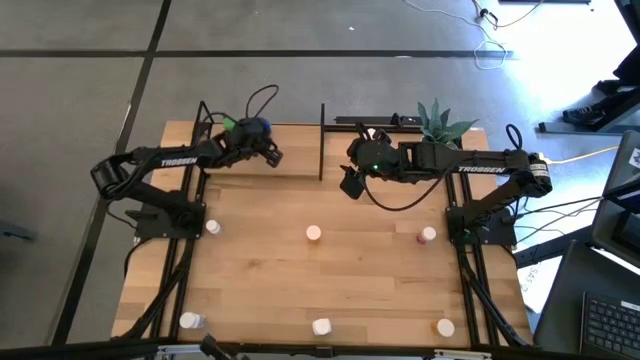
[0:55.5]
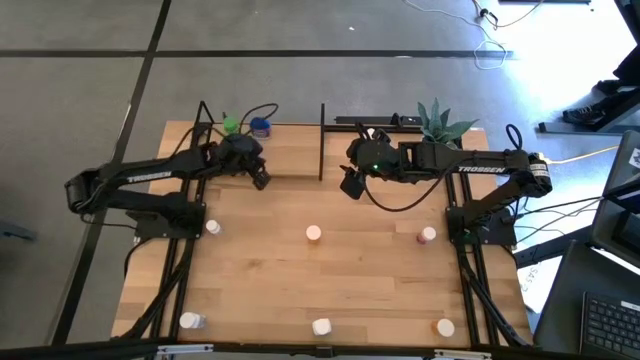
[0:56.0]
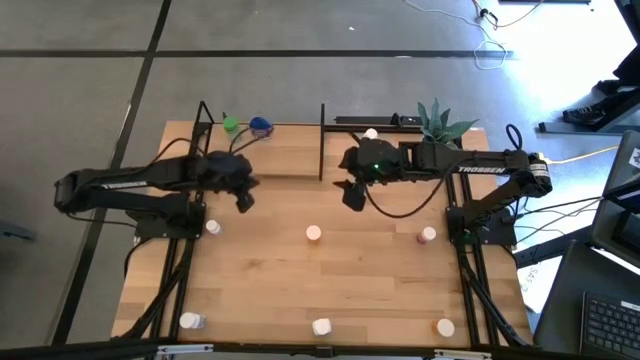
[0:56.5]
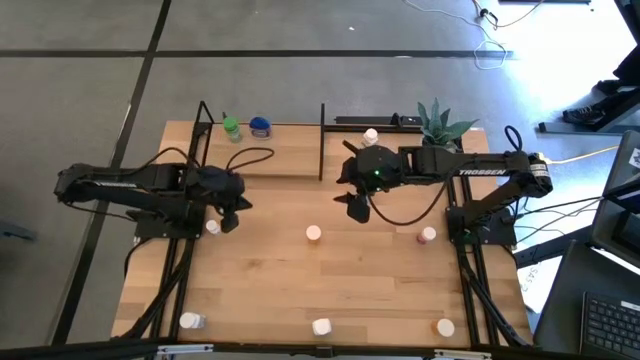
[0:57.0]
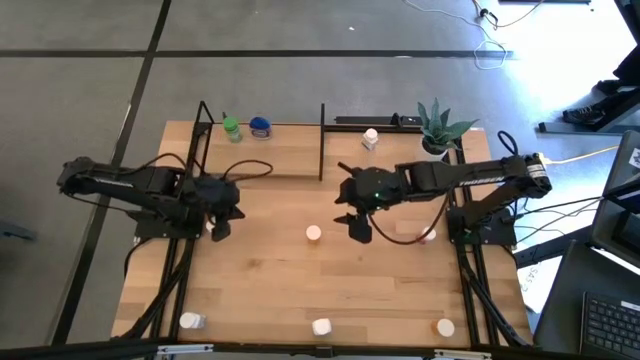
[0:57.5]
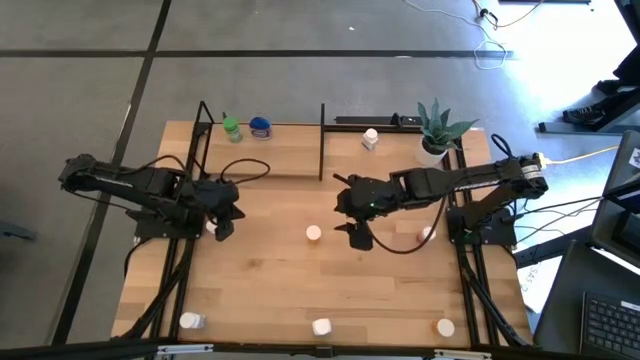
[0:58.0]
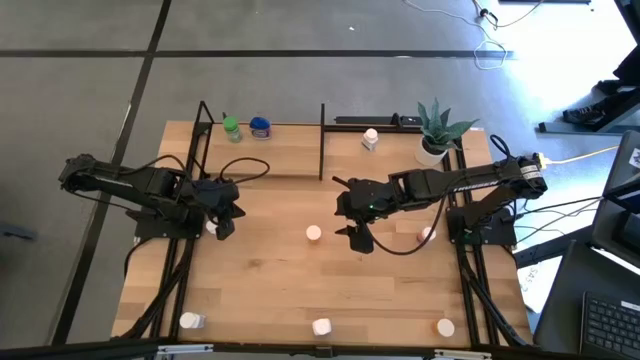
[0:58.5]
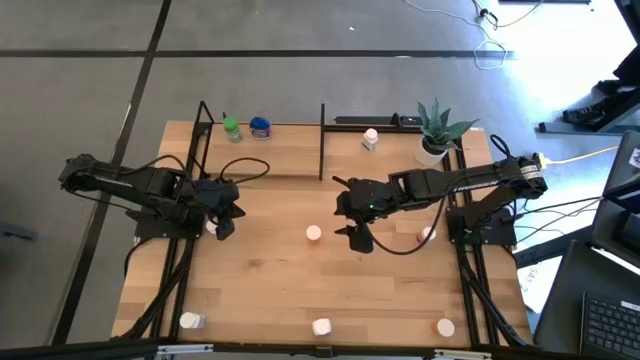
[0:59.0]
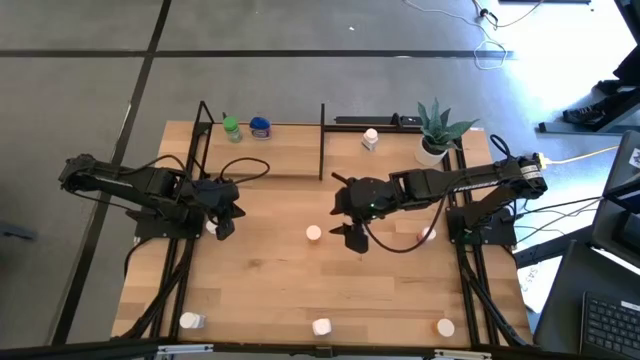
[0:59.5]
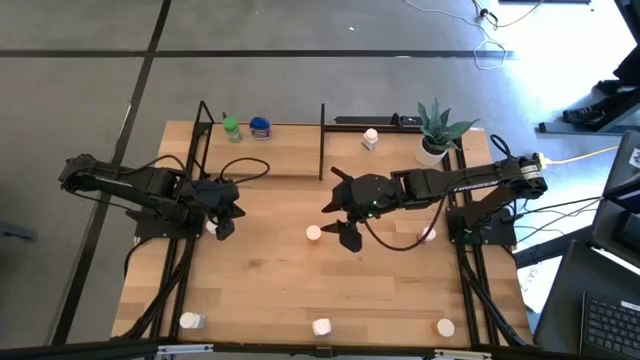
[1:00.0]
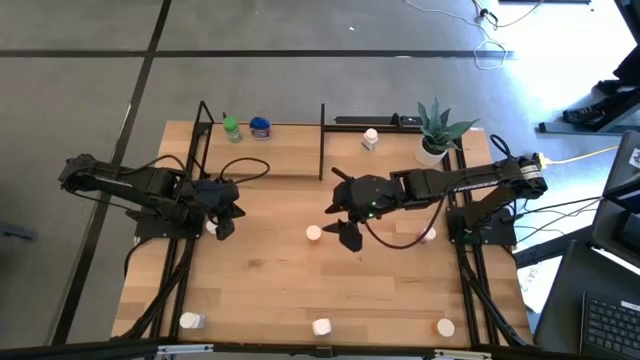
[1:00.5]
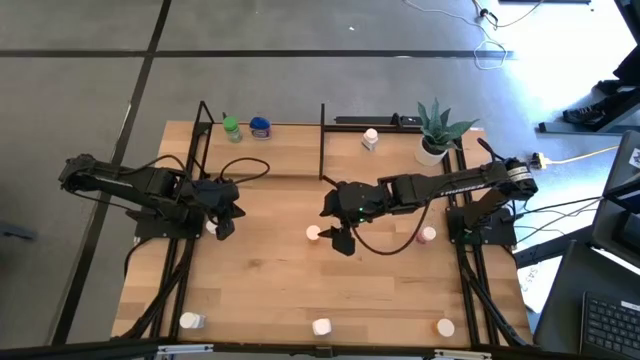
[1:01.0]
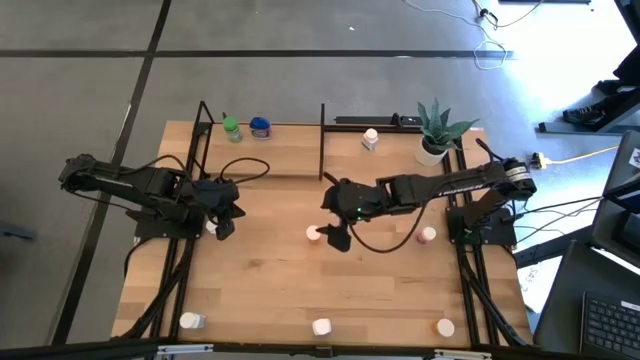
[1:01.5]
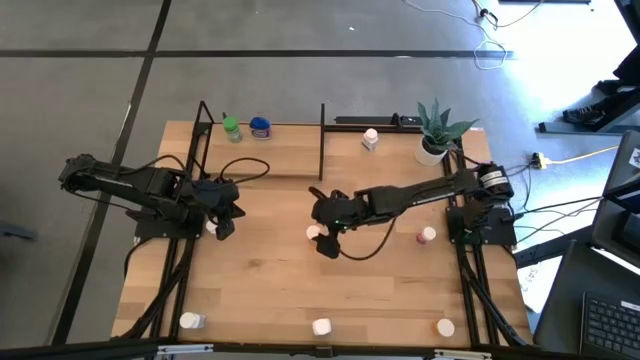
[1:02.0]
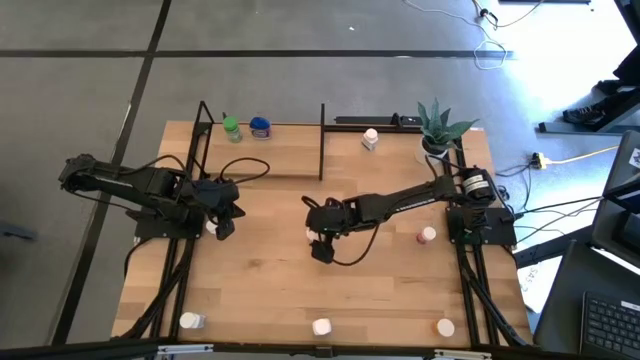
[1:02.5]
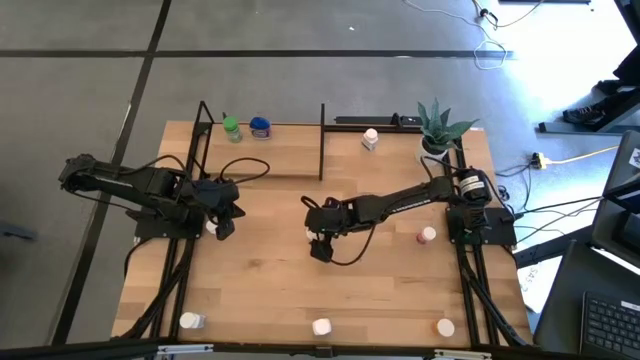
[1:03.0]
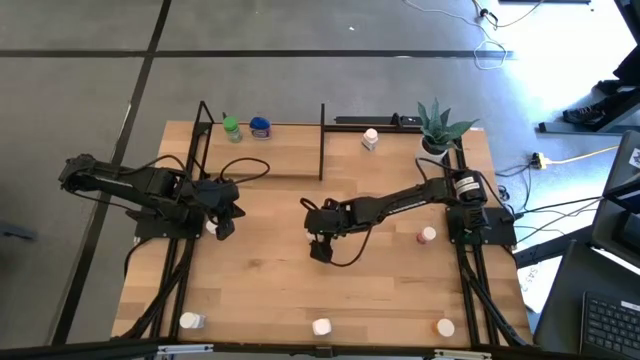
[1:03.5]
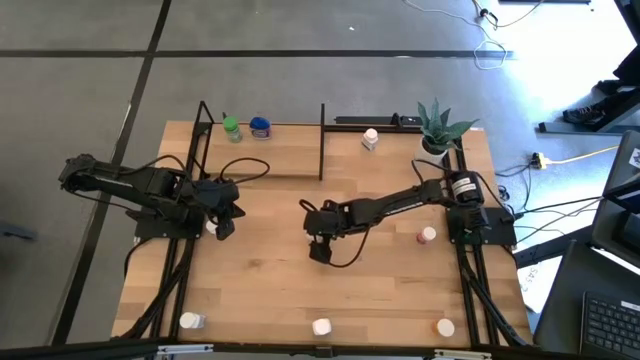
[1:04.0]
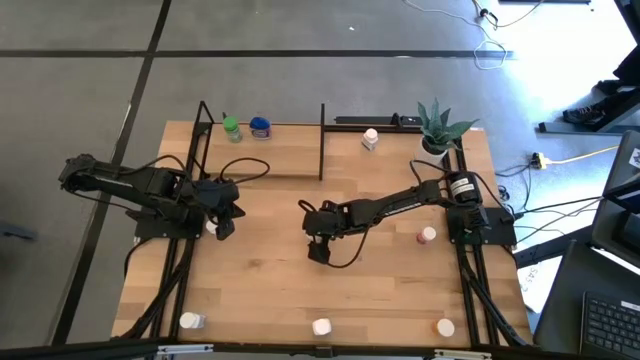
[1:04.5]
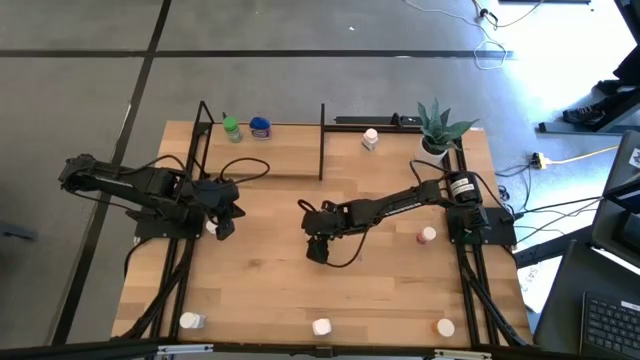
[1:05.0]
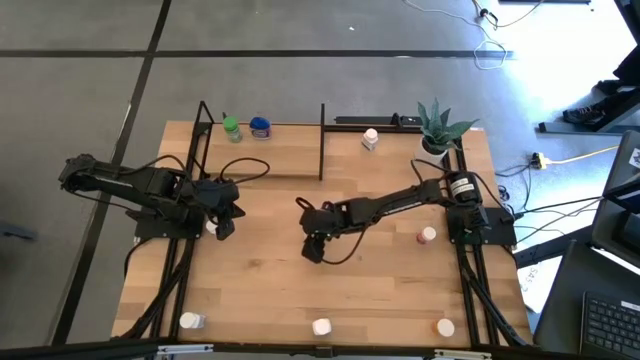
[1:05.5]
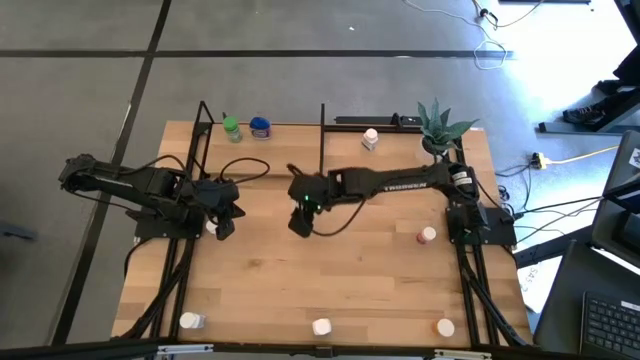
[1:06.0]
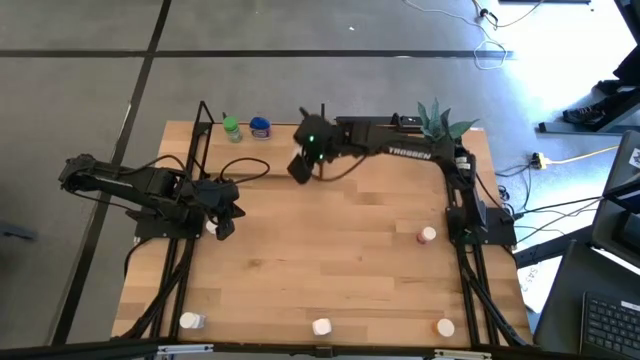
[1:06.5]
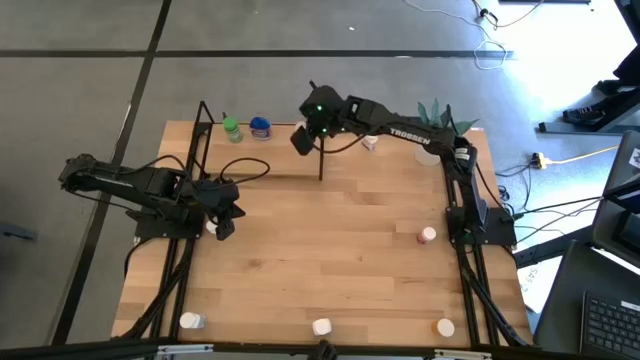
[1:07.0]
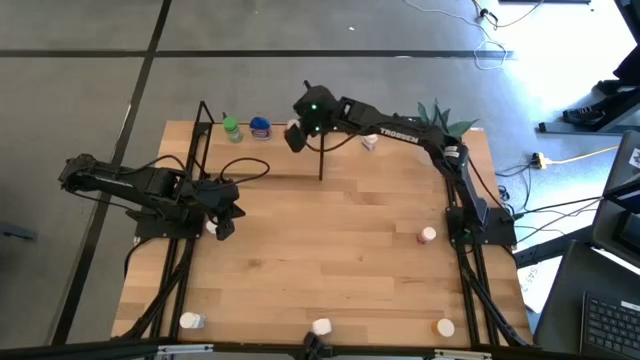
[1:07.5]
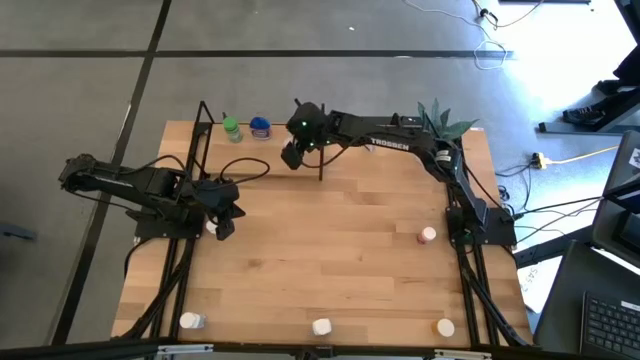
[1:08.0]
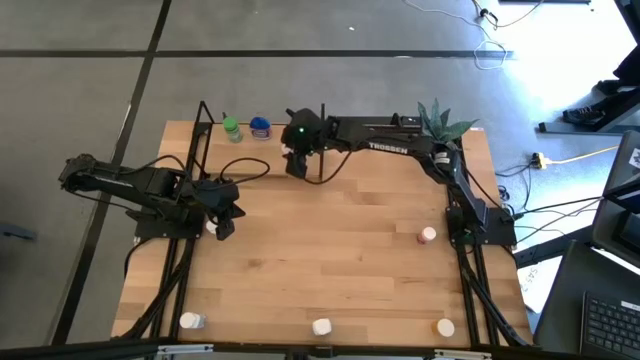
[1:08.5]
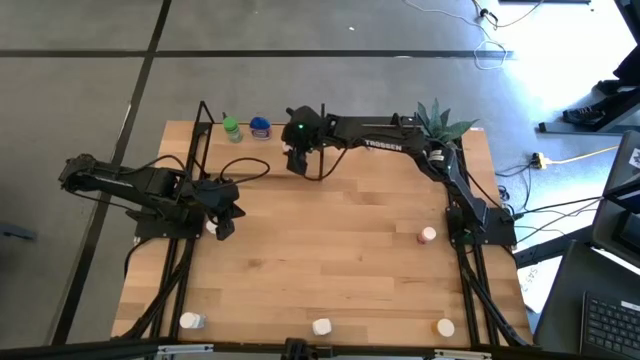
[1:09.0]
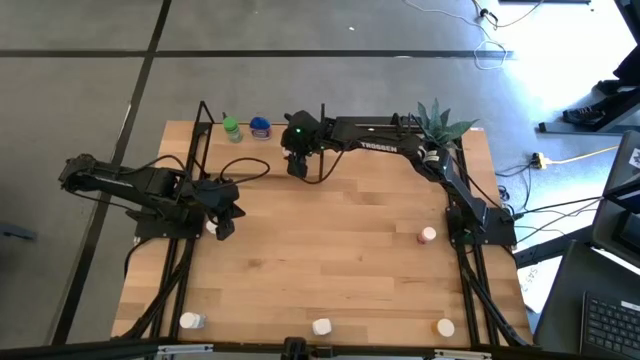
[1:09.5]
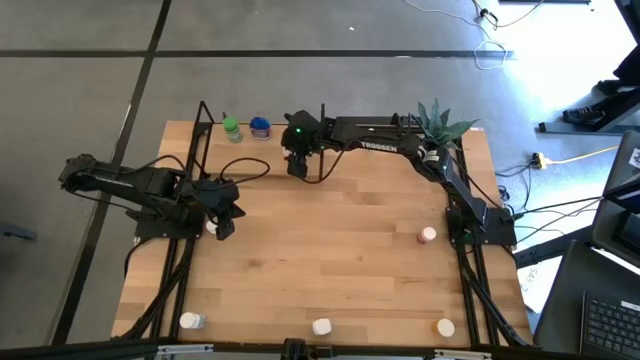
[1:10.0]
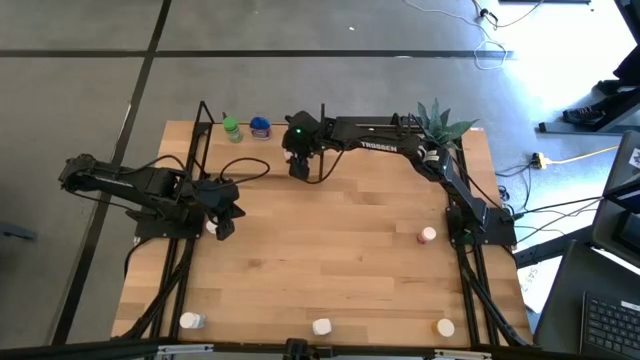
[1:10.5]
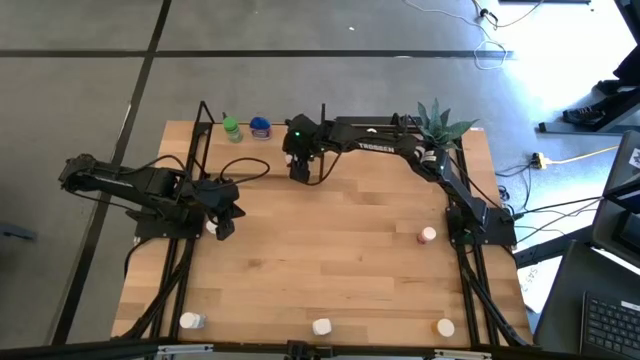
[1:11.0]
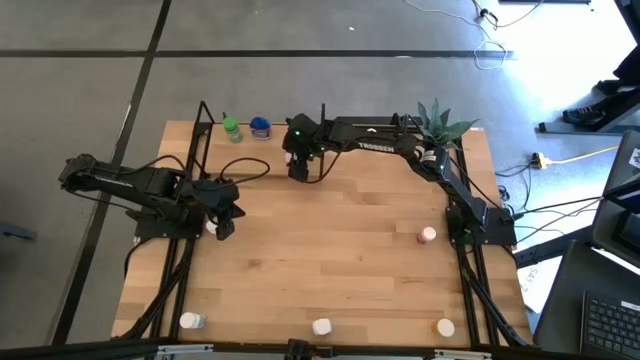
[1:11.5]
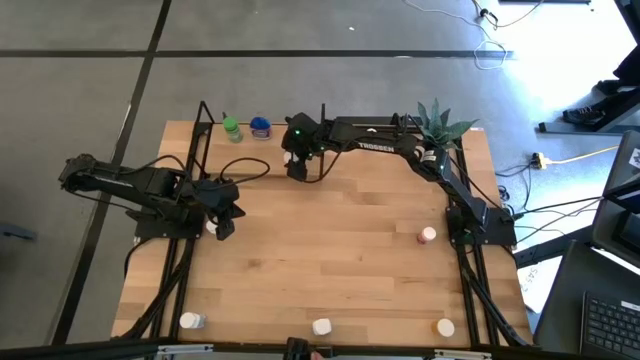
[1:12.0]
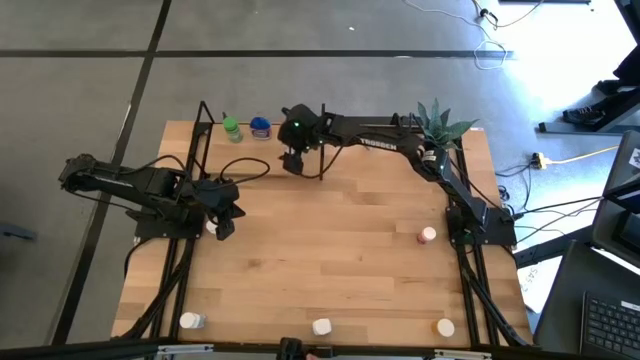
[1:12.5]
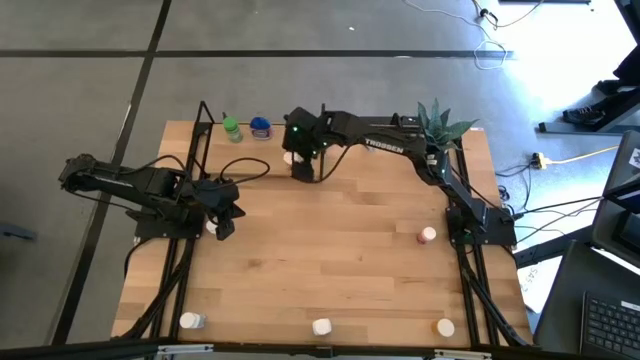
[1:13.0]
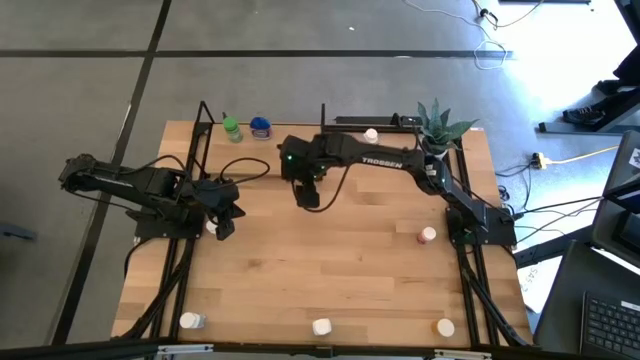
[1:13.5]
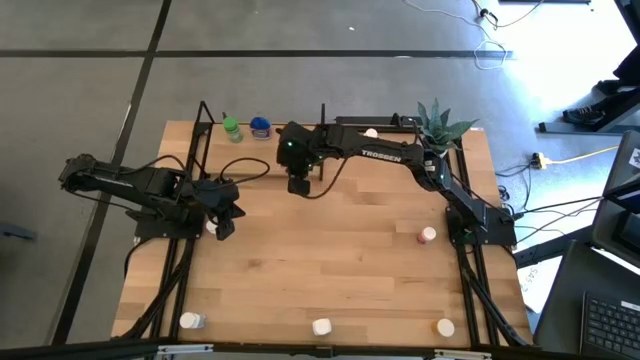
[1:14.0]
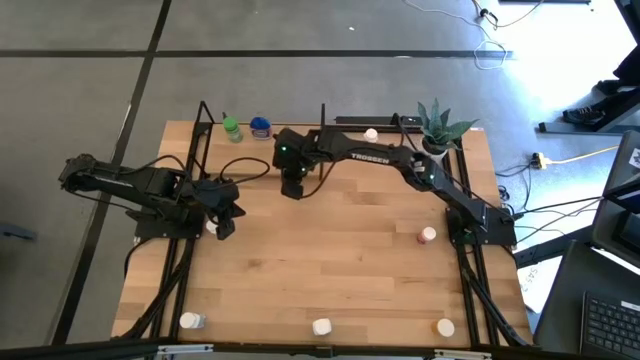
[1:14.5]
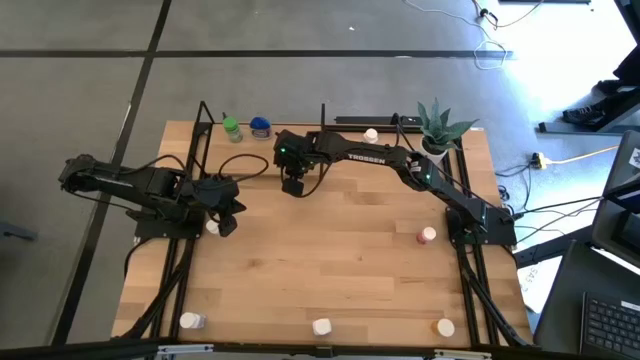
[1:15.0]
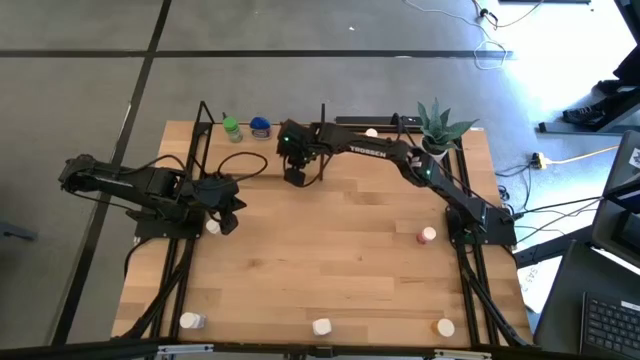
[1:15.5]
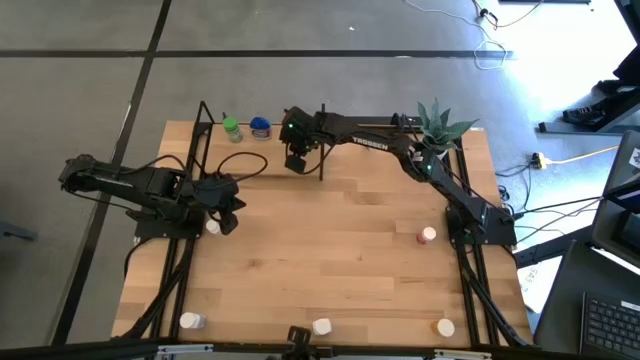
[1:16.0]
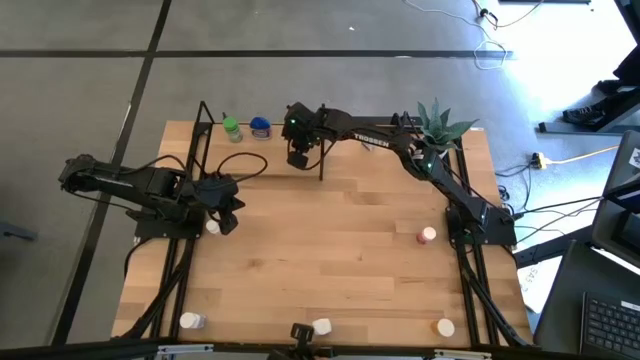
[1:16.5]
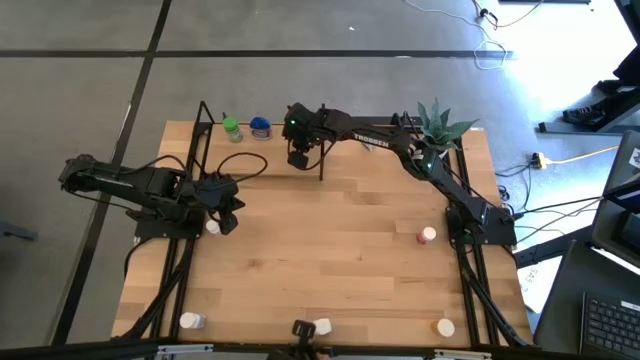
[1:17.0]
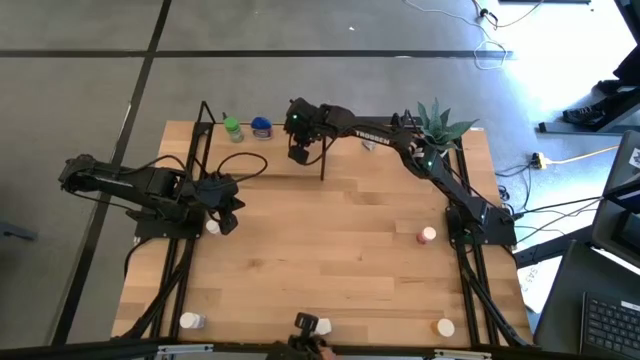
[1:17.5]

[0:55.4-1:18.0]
Task: Pick and place medicine bottles onto shelf by color
Put the orange pill bottle on the shelf
